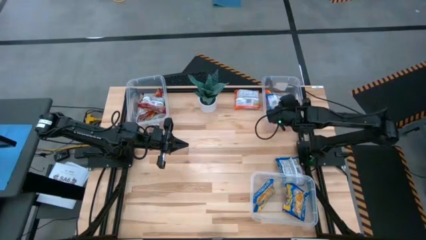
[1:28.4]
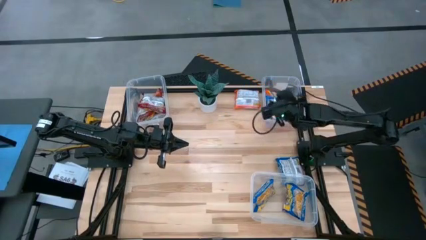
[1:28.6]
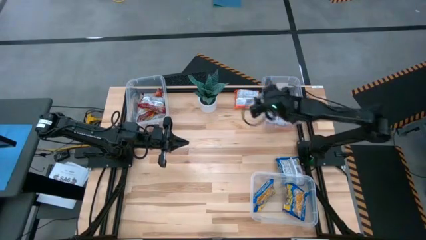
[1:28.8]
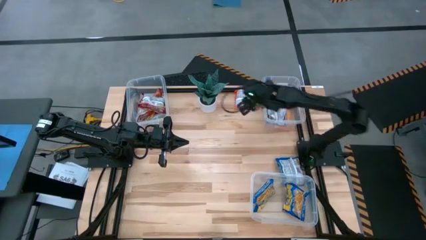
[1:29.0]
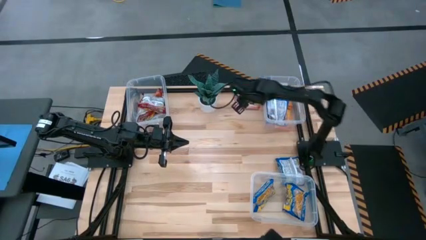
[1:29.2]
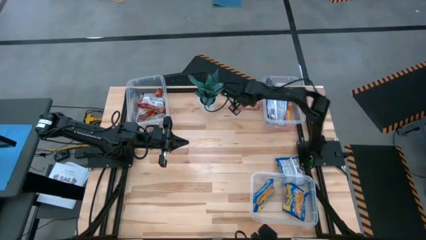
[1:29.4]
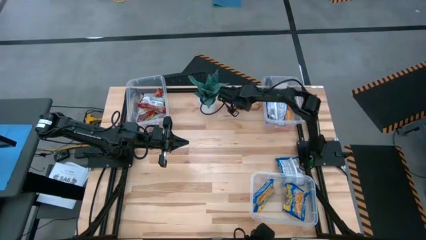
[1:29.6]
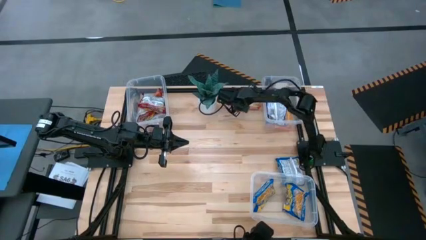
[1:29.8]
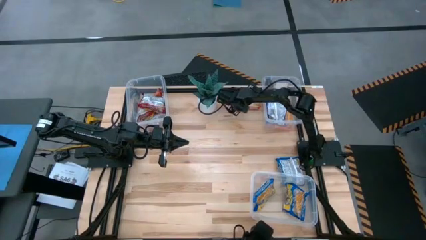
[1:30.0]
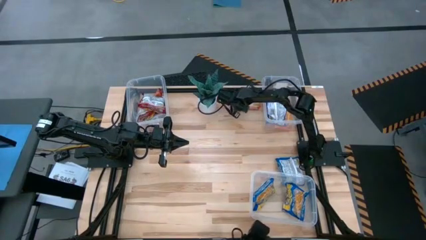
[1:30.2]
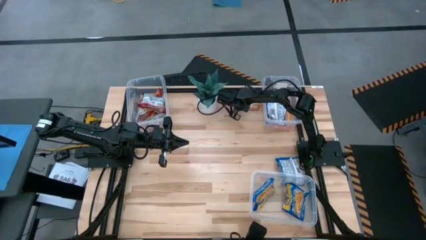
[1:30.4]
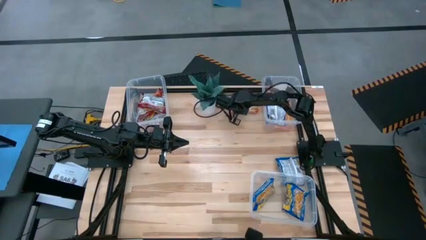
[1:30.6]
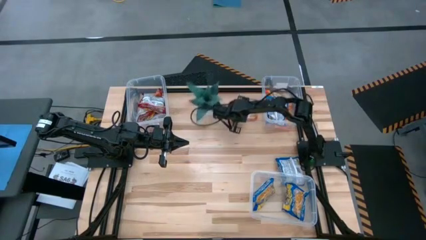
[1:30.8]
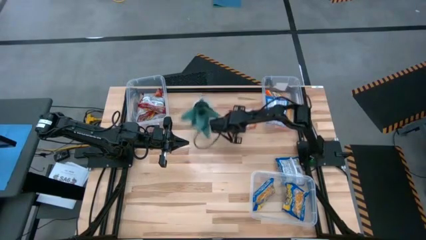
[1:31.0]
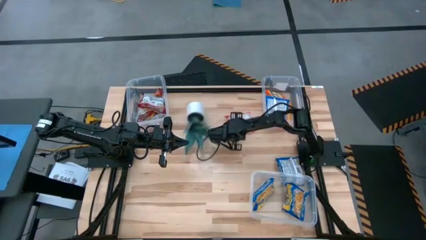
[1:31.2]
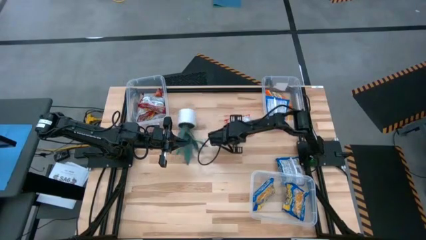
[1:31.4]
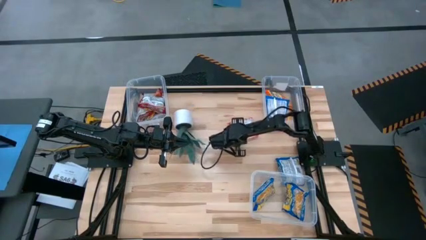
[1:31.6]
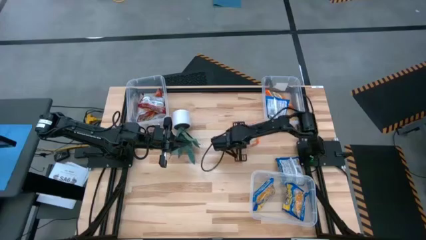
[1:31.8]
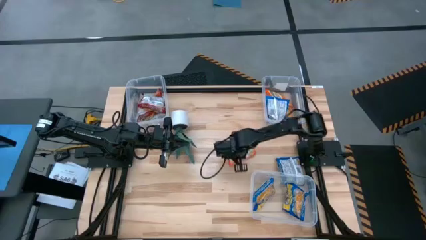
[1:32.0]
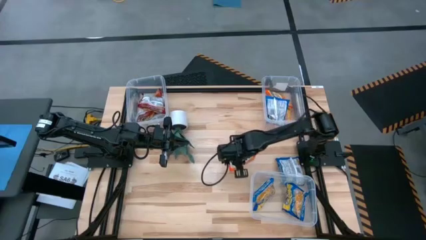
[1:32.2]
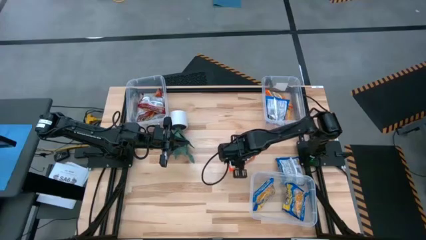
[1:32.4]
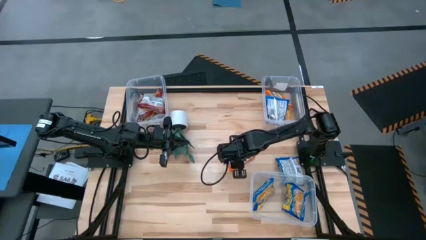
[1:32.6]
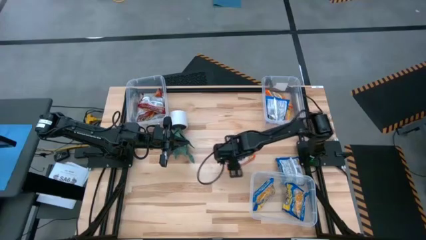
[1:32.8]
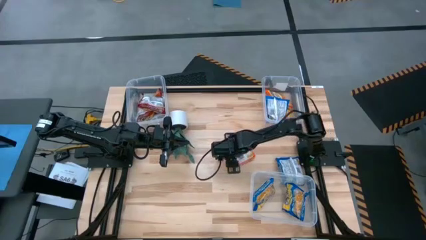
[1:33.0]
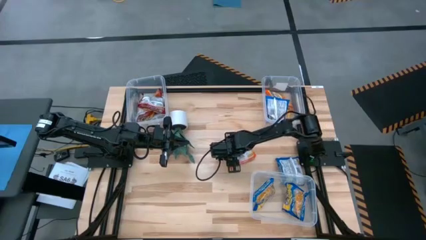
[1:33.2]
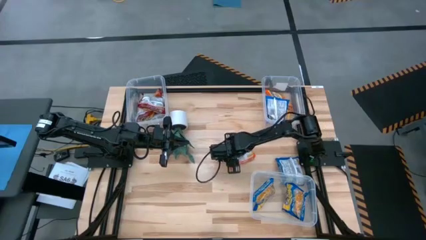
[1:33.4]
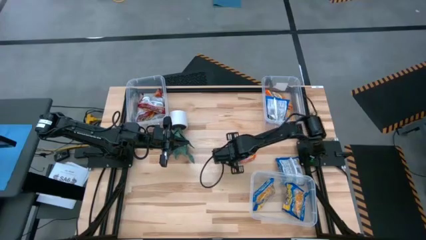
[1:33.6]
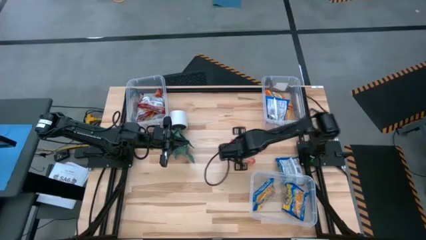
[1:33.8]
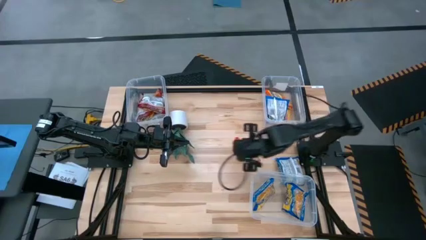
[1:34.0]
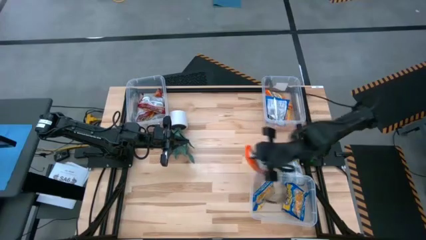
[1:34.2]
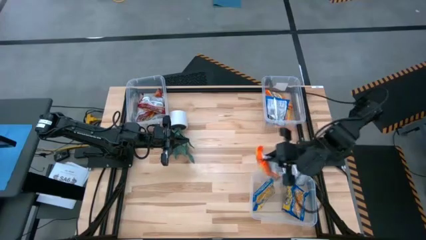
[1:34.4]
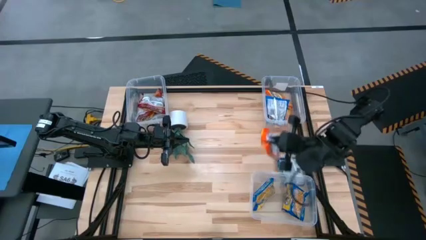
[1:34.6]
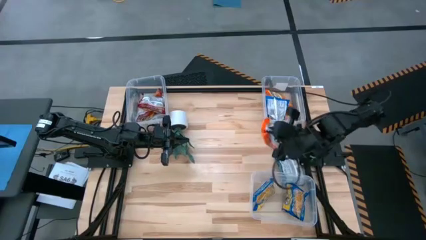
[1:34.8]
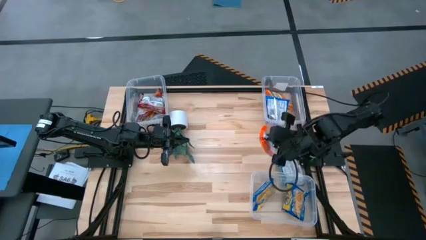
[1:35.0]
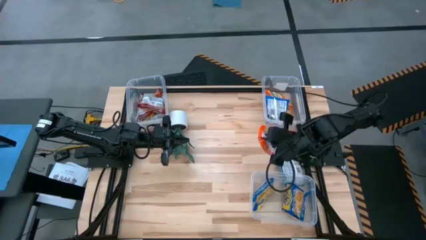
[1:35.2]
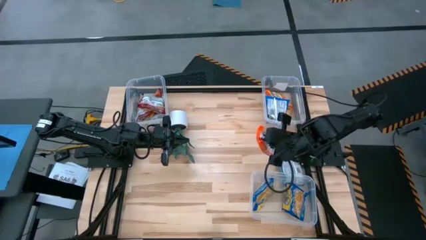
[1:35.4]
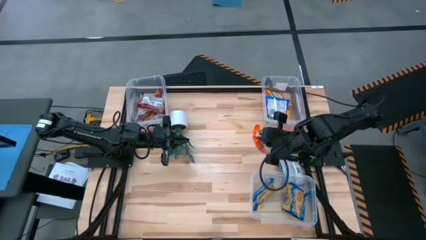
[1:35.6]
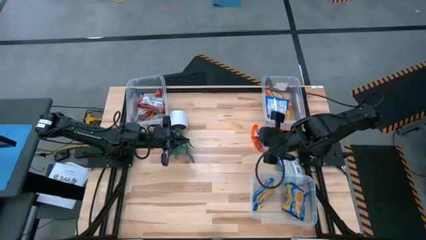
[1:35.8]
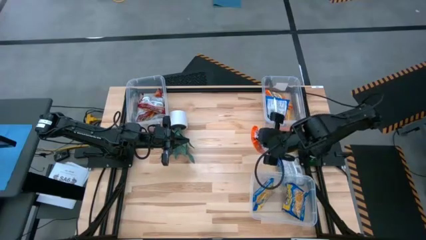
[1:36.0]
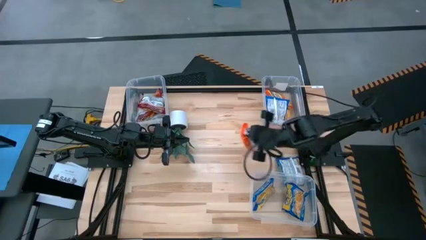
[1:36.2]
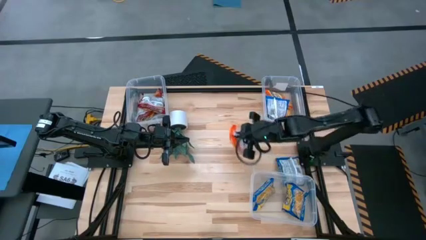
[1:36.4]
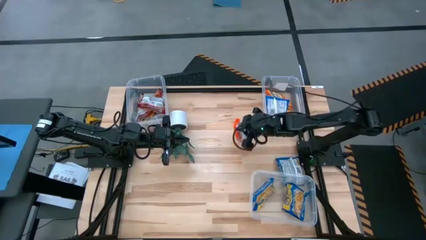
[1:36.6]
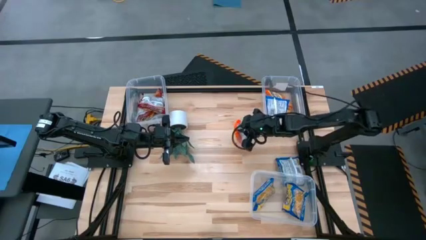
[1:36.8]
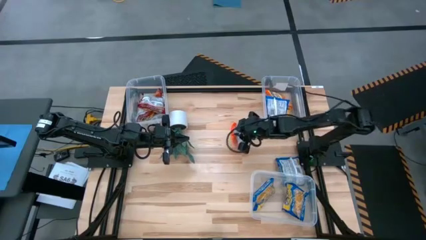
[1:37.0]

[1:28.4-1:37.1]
Task: Sort Maruchan noodles
Move the orange noodle pack from the top to the center of the table

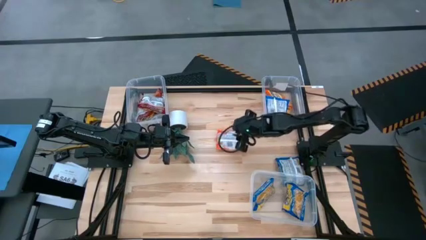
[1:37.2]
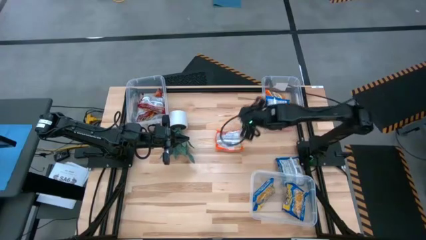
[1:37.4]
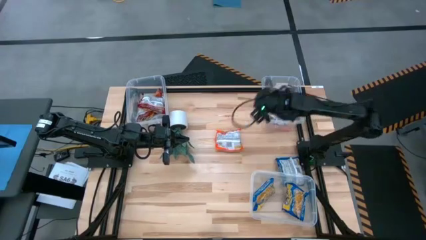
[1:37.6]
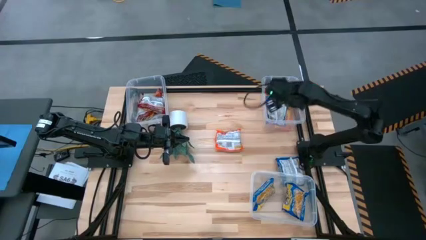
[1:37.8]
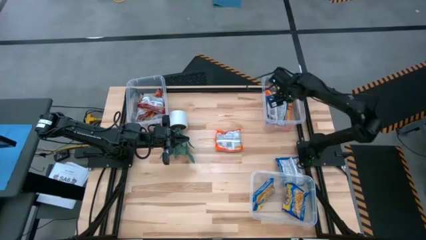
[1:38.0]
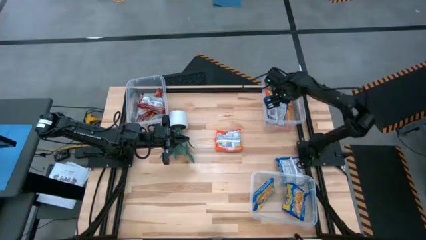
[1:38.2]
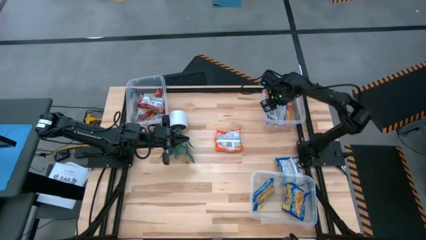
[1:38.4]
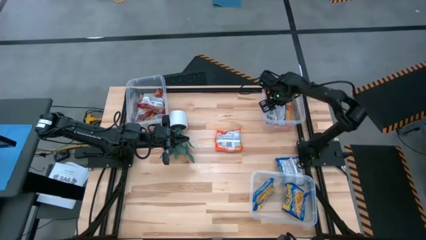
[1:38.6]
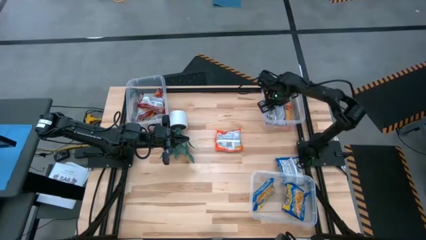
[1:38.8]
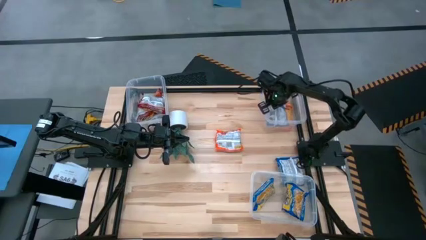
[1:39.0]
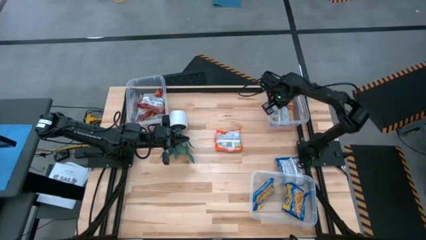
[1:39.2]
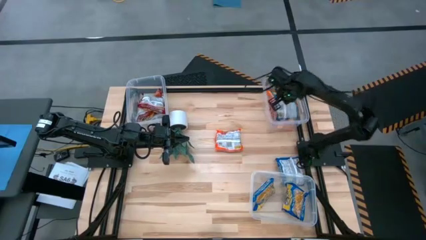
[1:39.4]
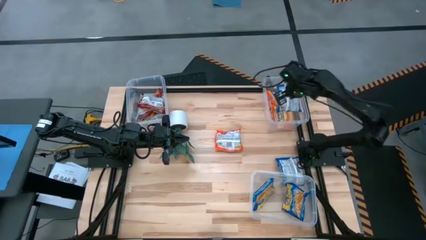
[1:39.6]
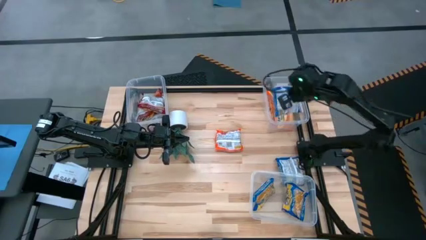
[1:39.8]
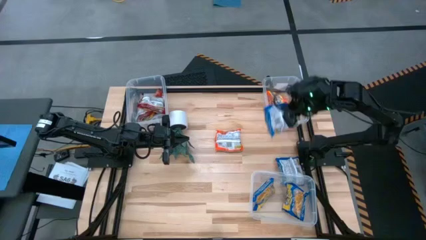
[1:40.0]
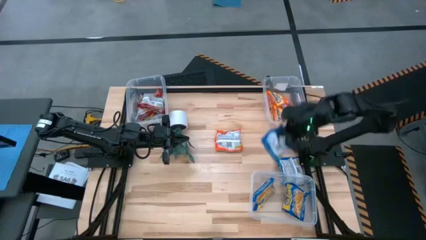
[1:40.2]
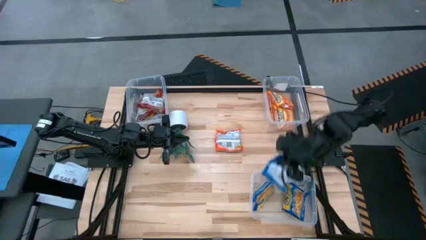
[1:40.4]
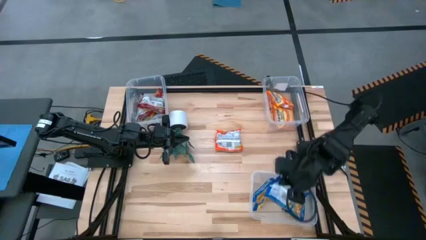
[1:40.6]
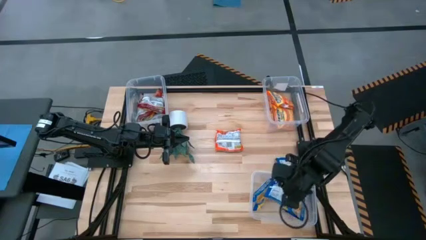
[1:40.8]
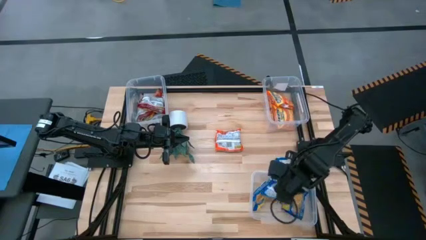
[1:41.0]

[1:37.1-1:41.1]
Remove the blue noodle pack from the top right transparent bin and transfer it to the bottom right transparent bin

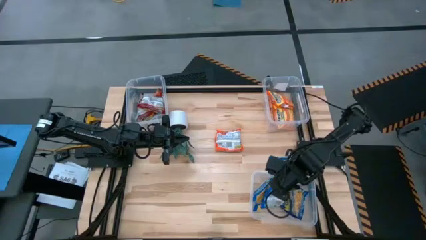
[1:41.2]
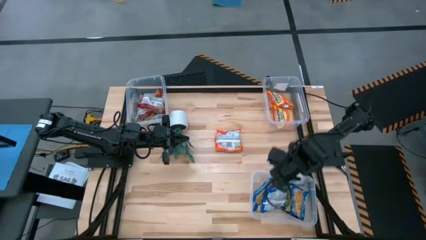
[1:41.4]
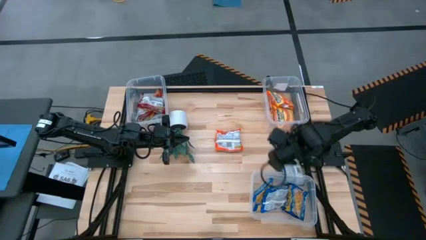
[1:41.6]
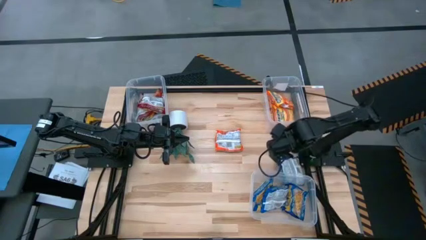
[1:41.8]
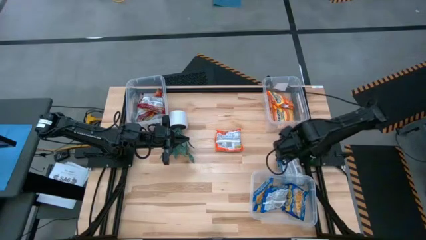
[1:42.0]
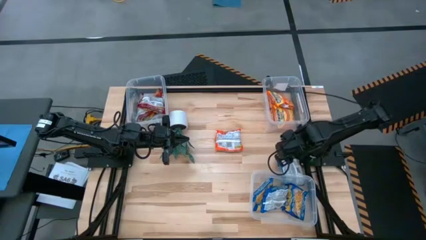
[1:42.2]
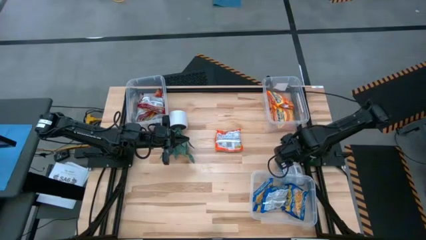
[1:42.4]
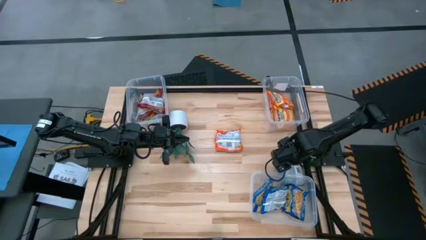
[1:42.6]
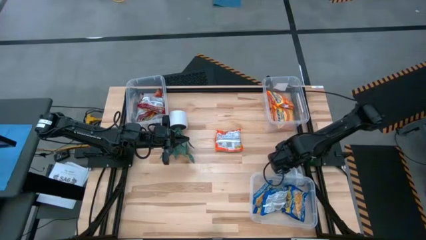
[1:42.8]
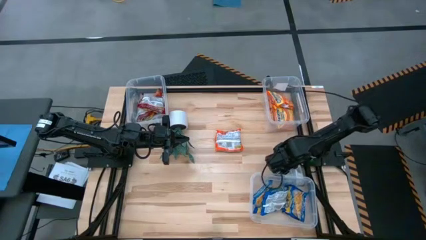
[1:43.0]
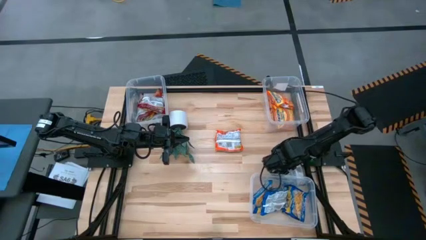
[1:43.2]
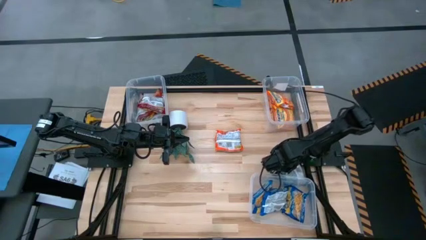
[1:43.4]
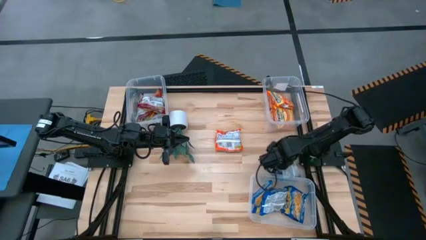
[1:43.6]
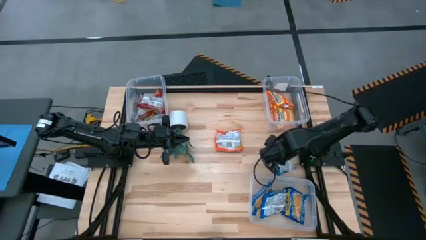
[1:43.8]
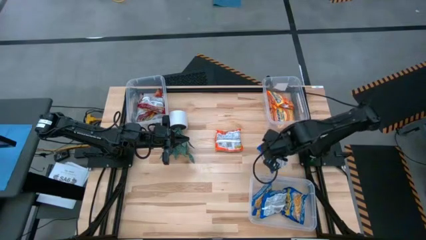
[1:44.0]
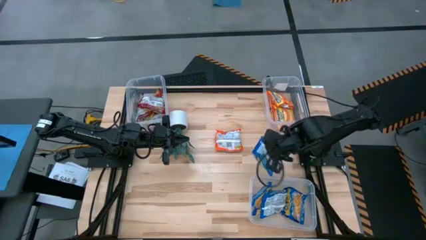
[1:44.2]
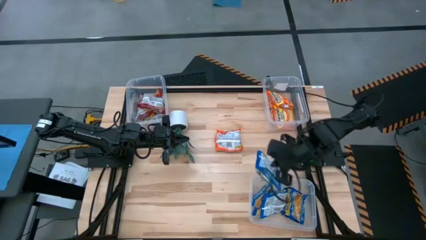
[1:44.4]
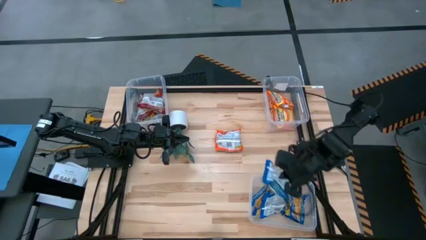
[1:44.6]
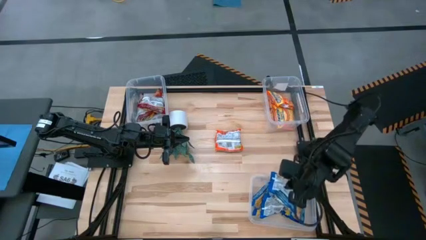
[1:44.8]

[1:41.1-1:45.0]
Put the blue noodle pack in the bottom right transparent bin
